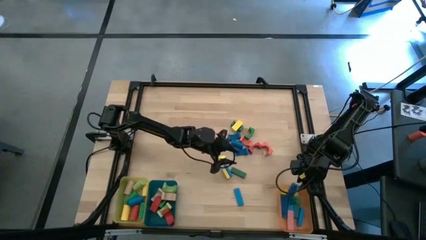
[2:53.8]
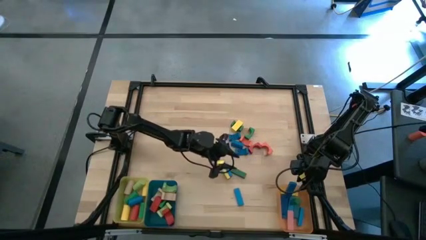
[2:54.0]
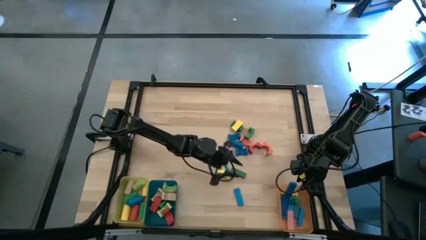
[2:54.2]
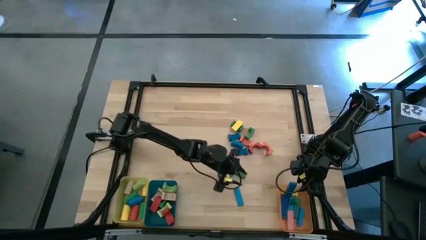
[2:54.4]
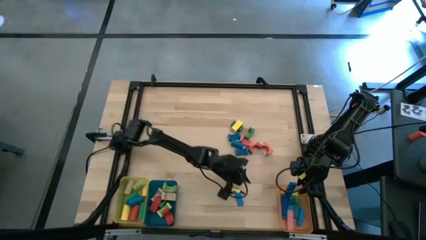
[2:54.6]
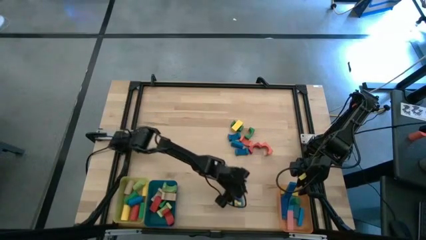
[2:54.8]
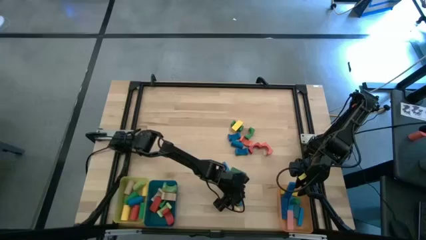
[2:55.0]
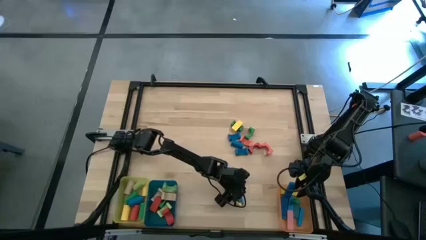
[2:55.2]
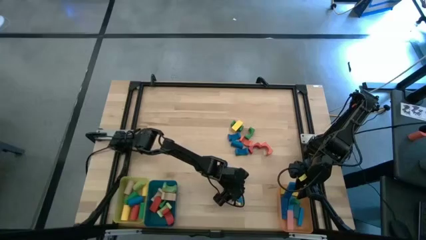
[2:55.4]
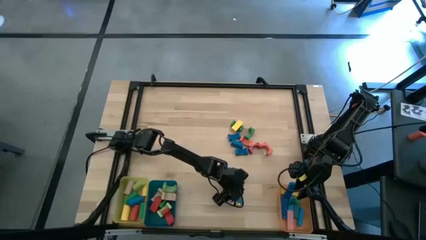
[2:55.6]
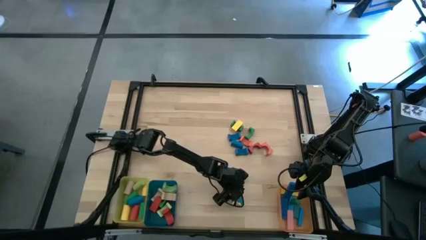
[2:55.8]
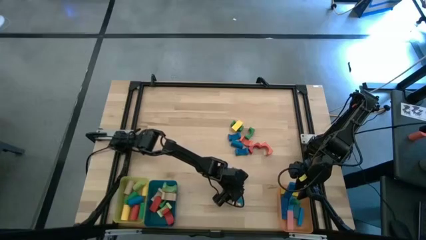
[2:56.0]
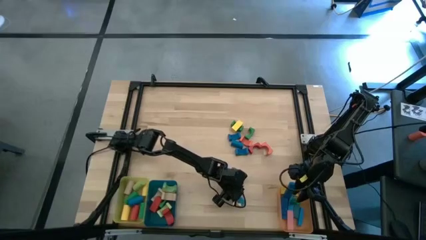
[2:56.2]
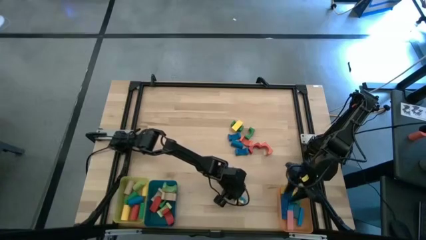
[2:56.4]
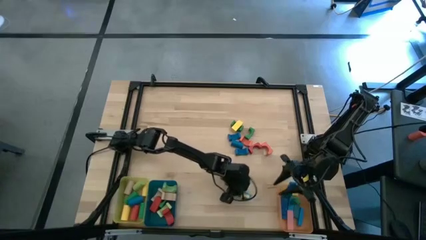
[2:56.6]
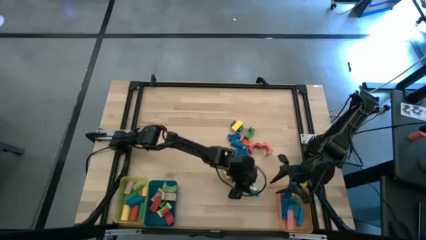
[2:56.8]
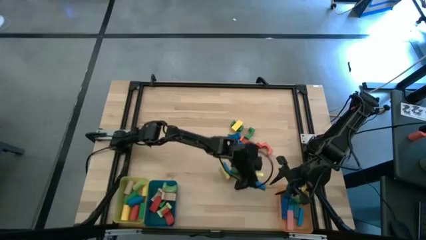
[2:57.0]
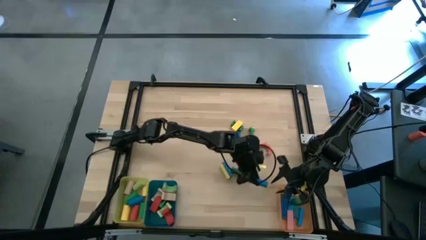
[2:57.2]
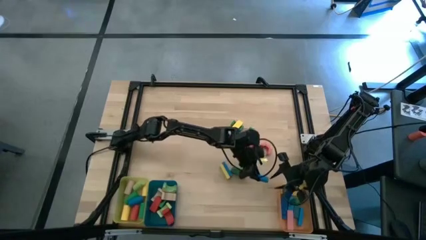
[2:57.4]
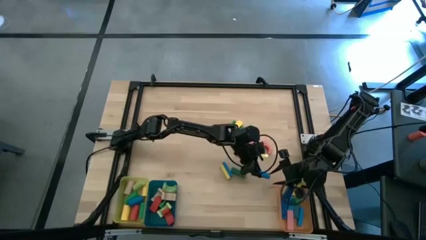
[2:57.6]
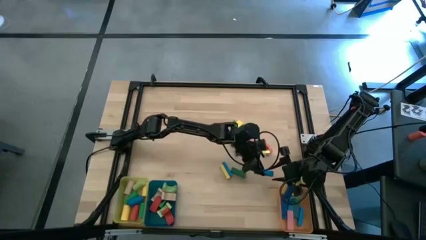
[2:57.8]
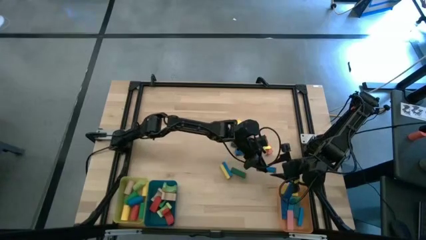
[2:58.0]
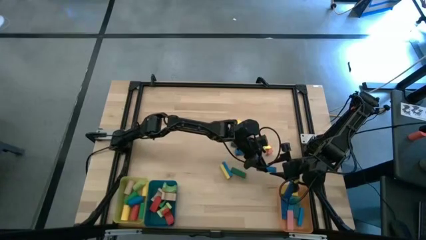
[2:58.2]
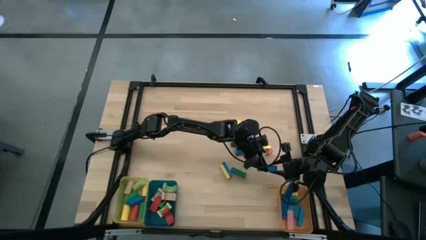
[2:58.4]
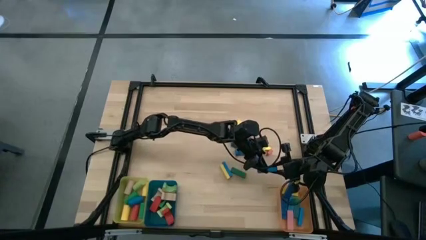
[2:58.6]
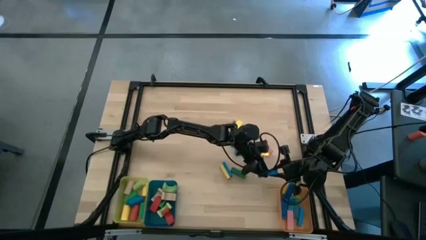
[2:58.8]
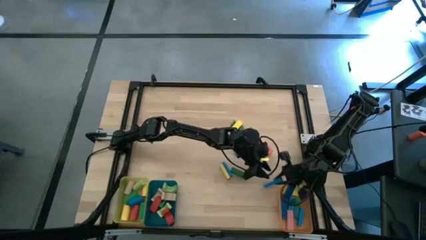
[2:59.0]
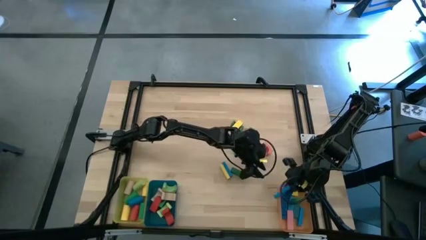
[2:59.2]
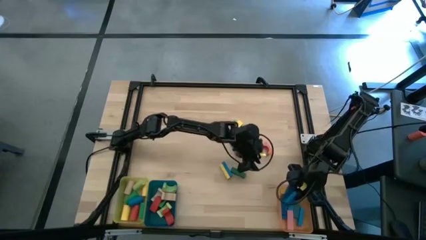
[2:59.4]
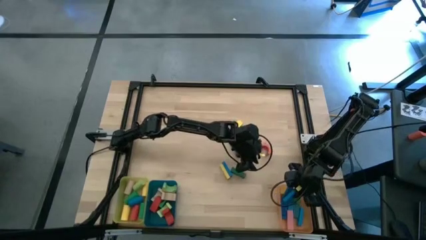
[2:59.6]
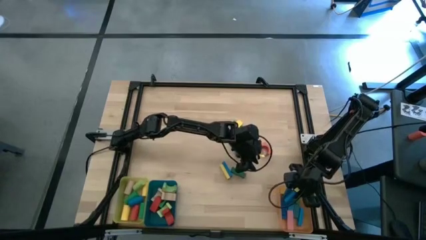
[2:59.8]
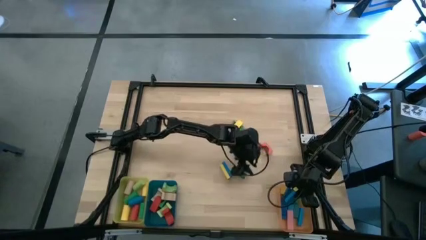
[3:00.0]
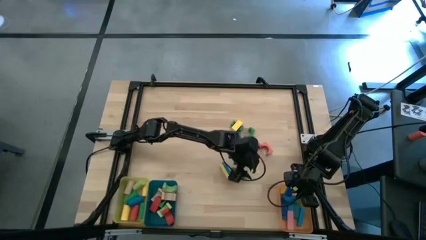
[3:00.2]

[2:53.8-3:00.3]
Task: Sort blocks by size
Put the blue rectangular block into the orange bin

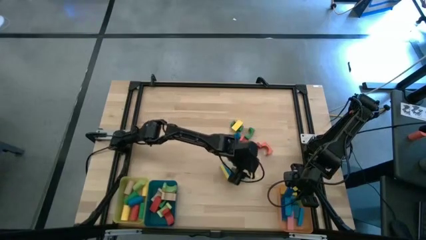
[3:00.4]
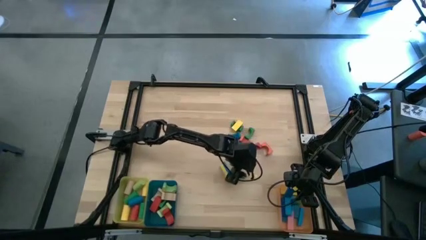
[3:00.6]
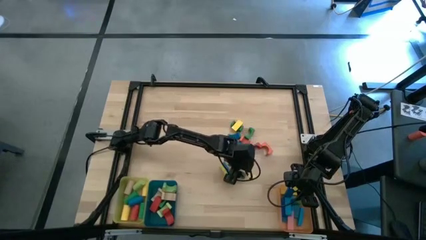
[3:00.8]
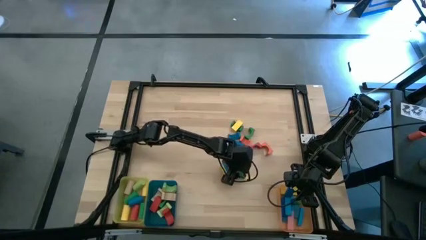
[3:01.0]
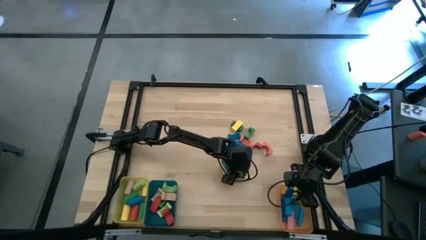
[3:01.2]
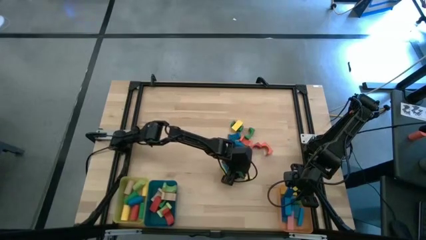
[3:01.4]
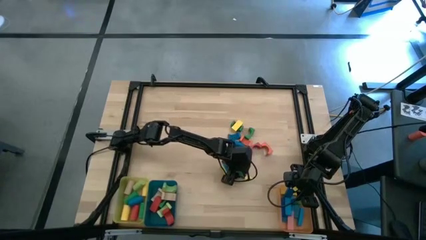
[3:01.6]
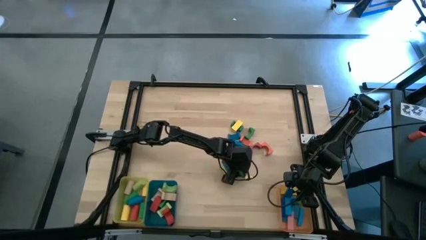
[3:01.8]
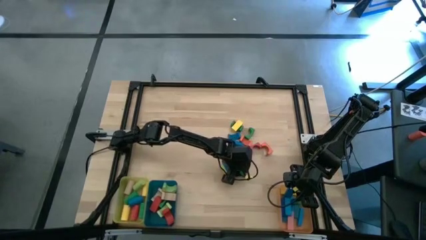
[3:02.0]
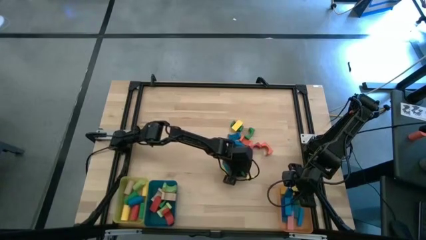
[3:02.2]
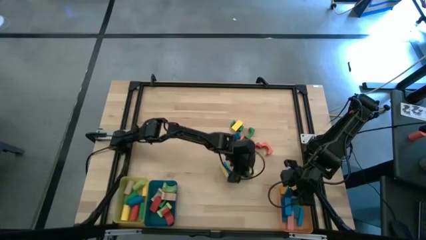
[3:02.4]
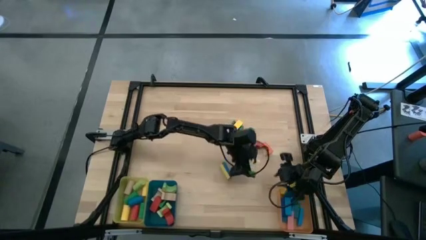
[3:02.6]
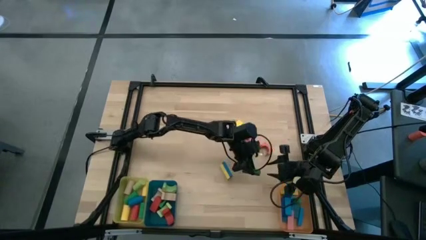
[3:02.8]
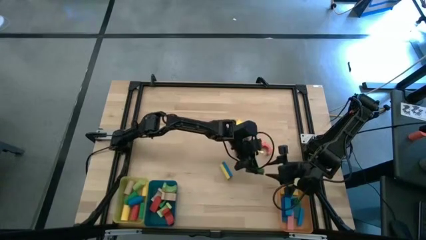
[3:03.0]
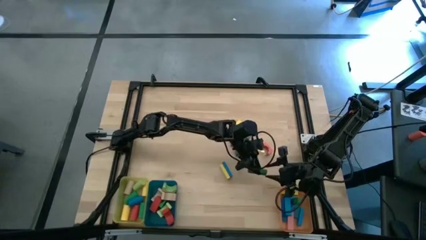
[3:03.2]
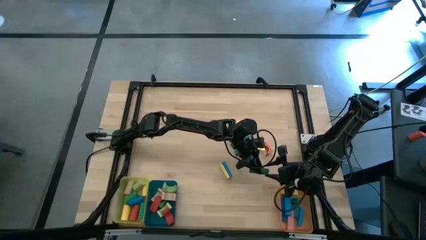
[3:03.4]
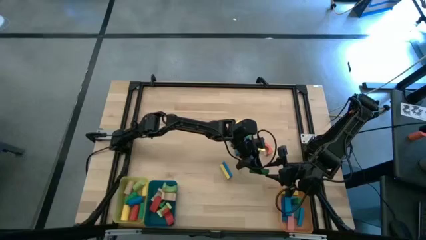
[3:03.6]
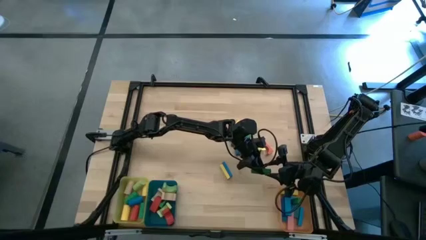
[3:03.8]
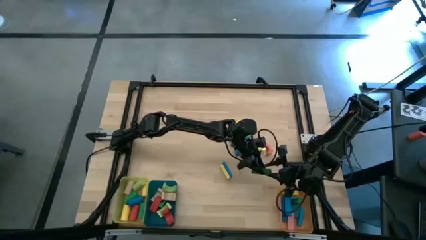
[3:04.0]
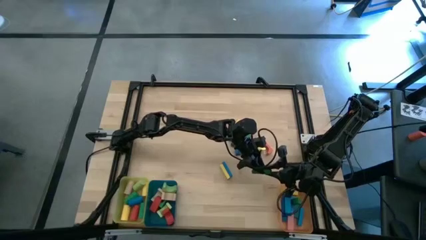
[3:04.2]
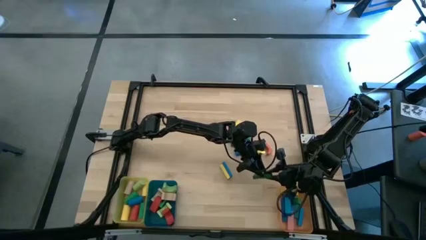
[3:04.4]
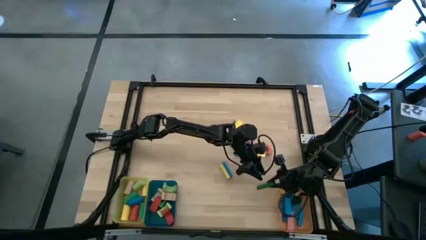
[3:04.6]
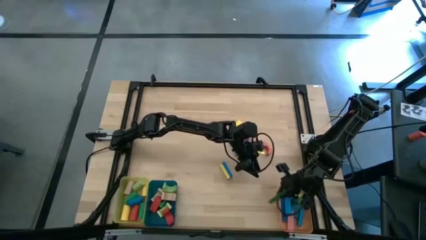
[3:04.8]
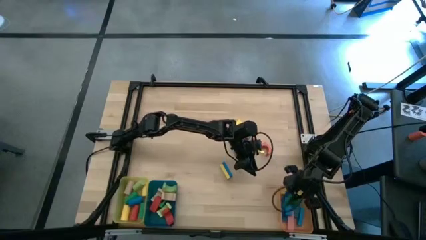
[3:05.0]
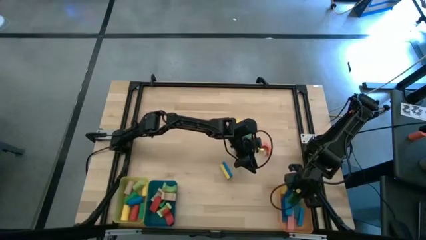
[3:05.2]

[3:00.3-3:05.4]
Put the green rectangular block into the orange bin

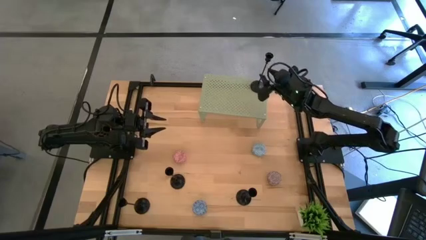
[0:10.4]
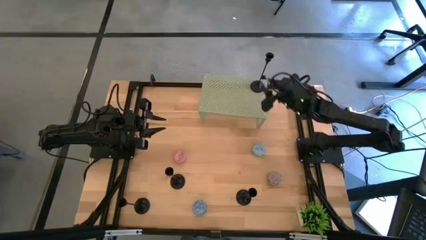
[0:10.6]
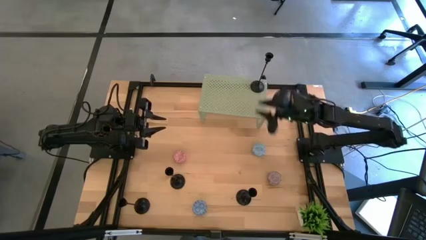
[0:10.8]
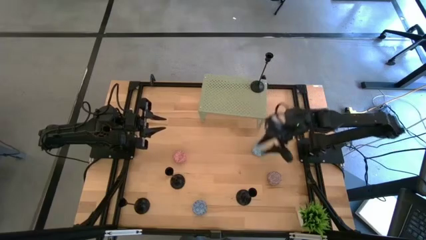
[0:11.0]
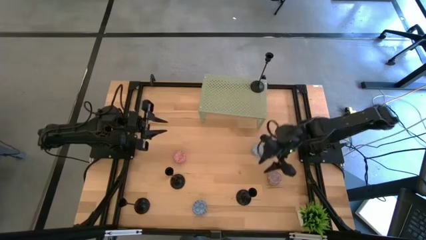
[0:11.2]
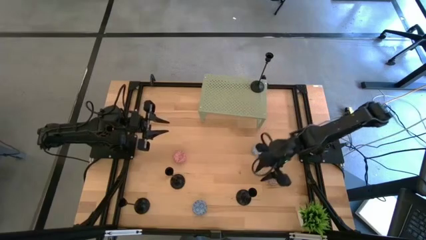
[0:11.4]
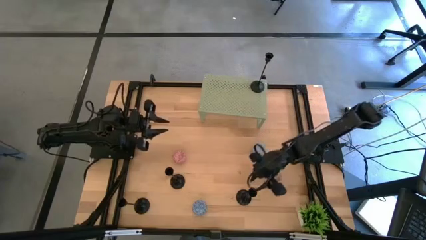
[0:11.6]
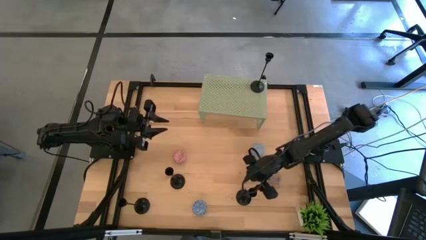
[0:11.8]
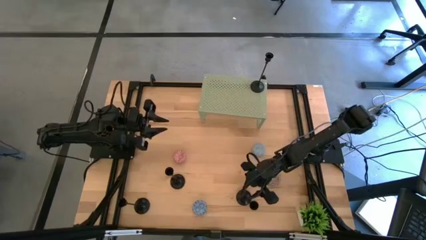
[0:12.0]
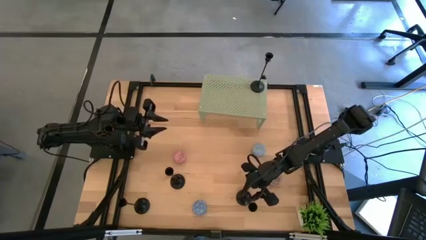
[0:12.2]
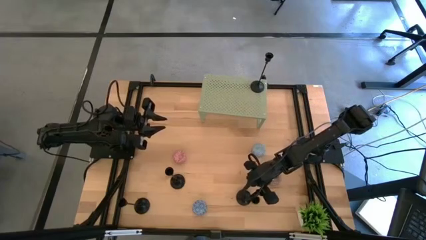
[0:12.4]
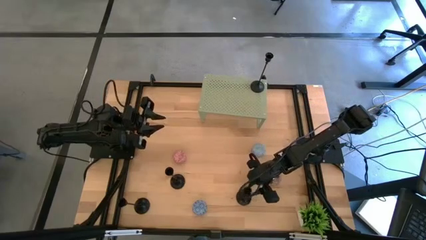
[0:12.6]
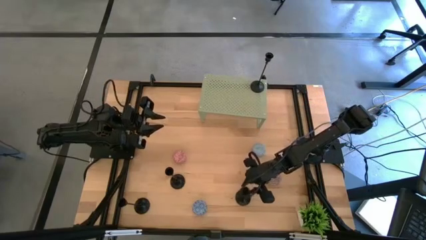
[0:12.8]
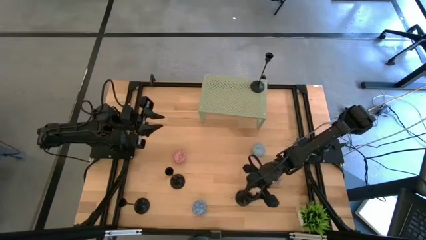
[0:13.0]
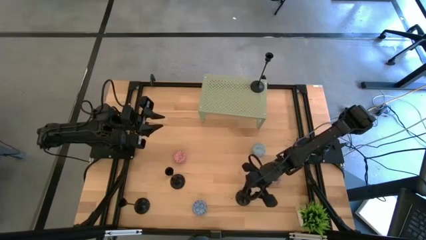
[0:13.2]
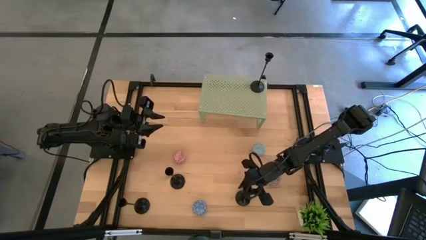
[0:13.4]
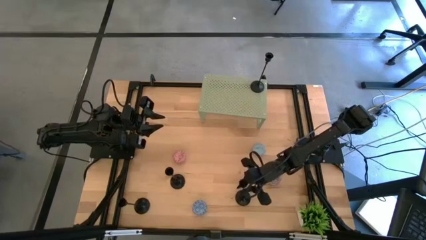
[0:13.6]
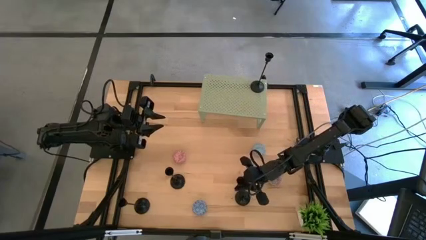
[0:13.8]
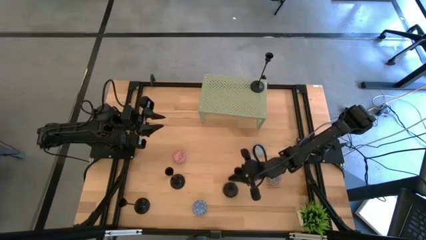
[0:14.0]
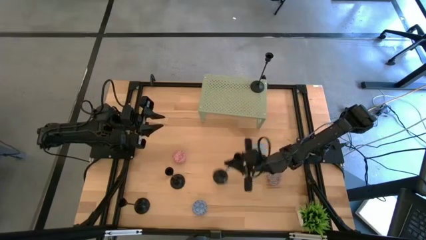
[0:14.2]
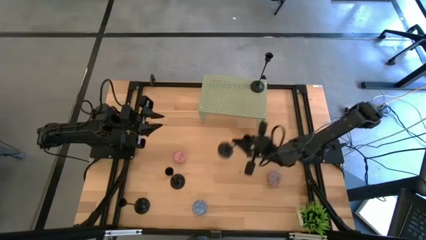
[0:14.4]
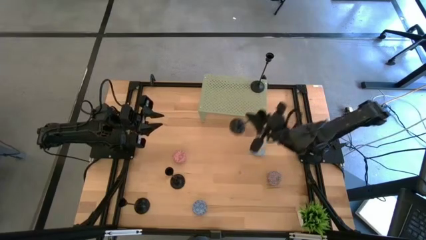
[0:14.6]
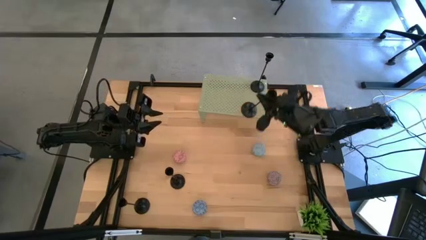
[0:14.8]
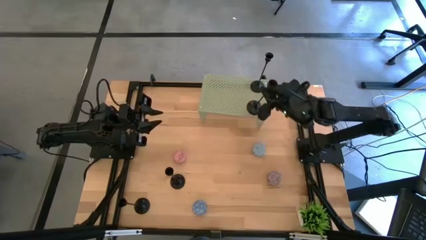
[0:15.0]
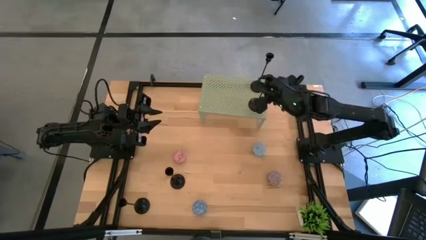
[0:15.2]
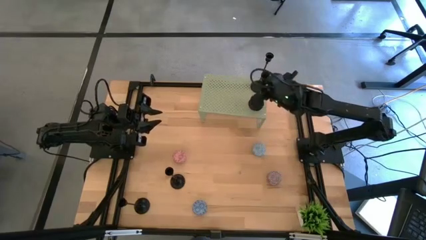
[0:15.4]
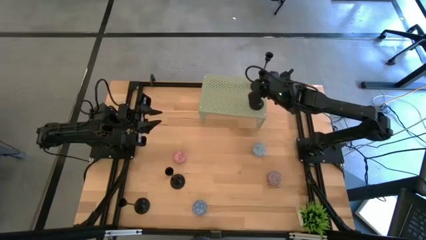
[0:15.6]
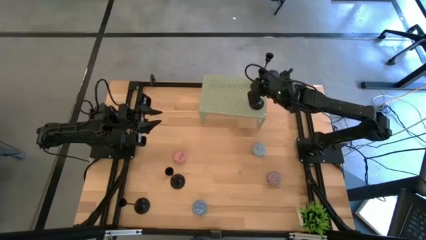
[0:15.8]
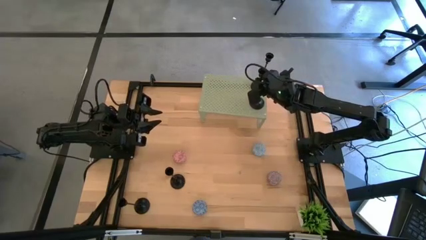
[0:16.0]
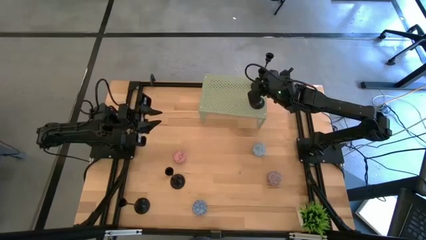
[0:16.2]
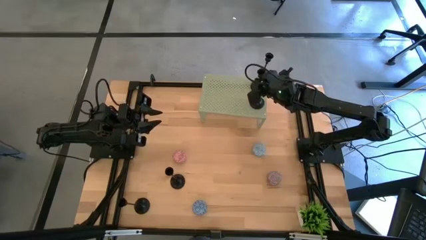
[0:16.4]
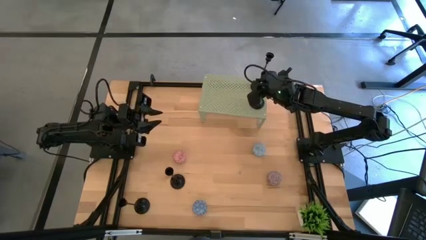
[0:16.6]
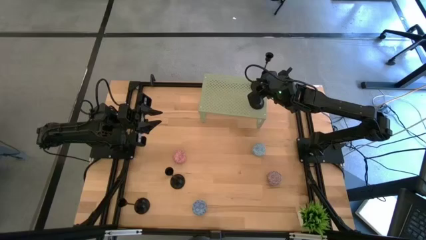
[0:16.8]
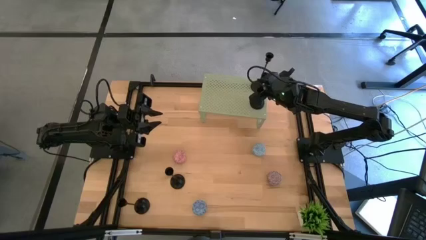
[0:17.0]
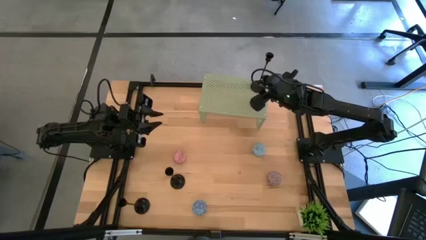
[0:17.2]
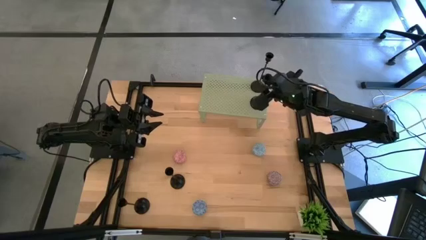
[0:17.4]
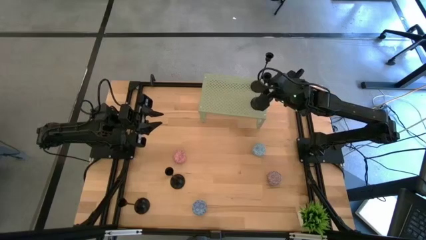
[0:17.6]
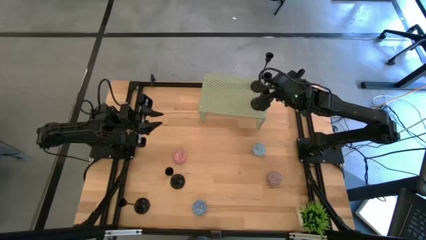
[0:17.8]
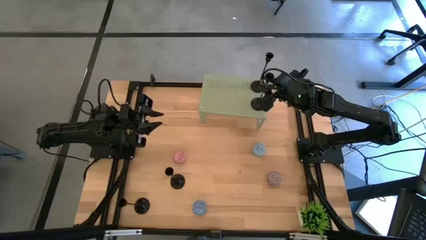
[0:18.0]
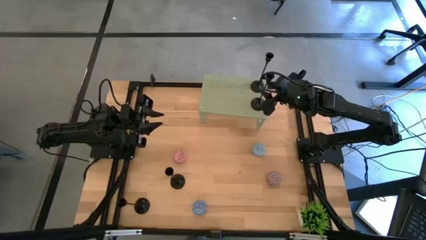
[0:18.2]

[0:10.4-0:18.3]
Task: Pick & Place candle stick holders
Put the black candle holder on the shelf aligned with the other black candle holder
